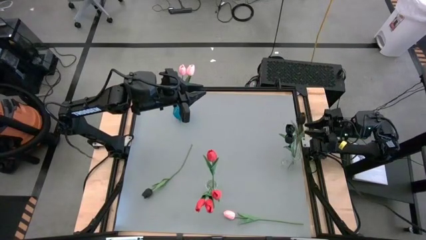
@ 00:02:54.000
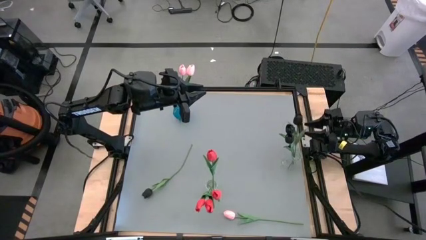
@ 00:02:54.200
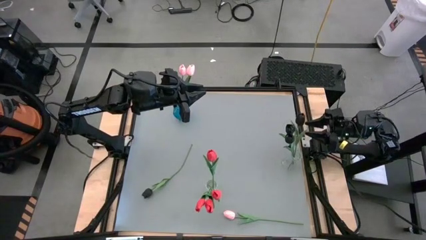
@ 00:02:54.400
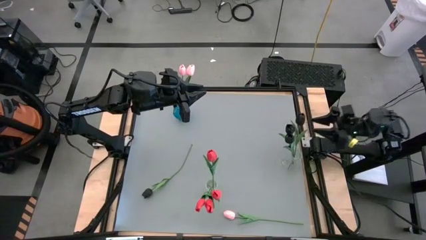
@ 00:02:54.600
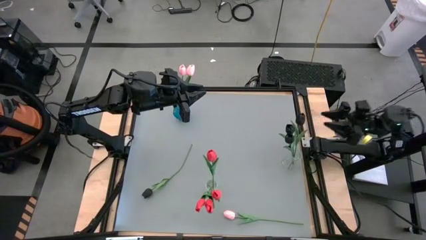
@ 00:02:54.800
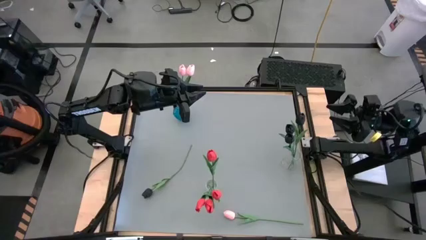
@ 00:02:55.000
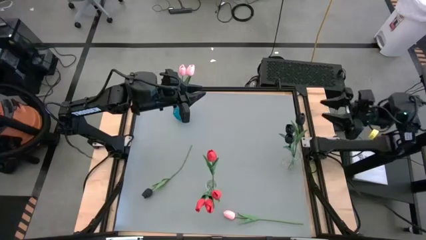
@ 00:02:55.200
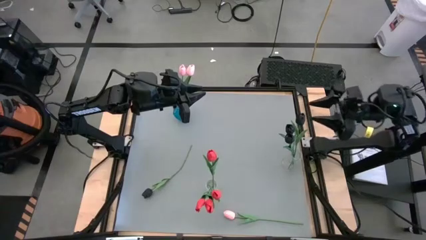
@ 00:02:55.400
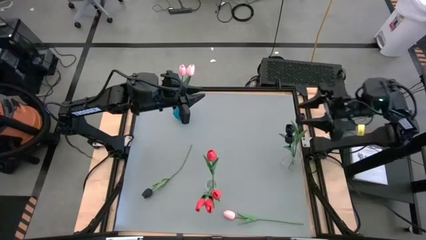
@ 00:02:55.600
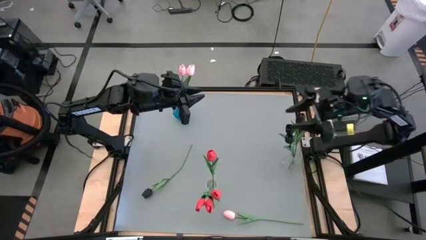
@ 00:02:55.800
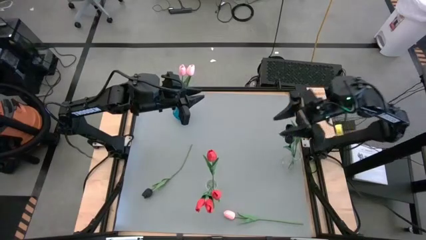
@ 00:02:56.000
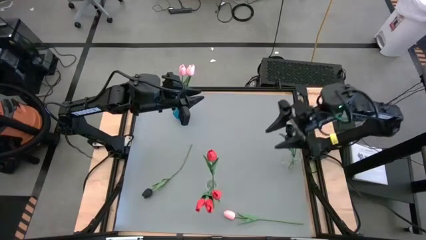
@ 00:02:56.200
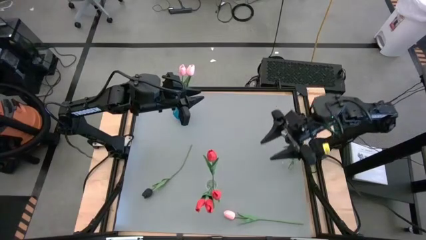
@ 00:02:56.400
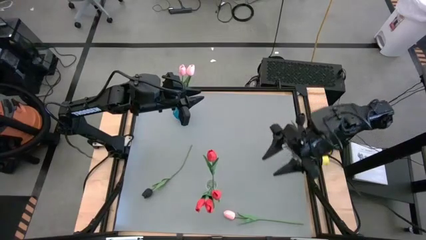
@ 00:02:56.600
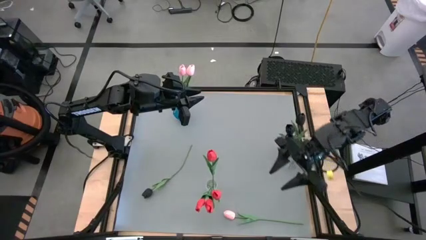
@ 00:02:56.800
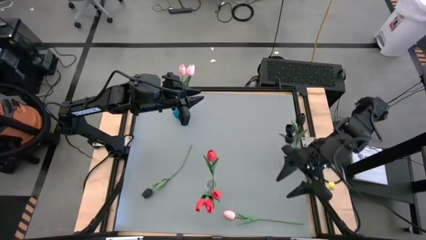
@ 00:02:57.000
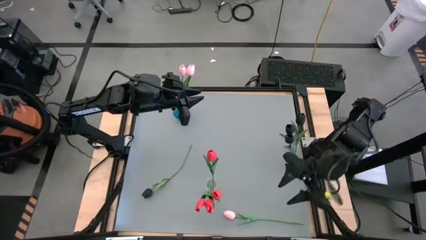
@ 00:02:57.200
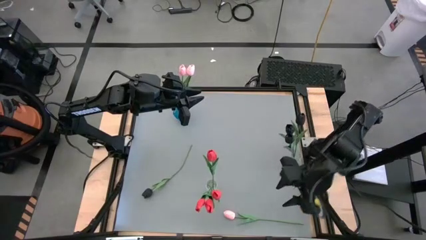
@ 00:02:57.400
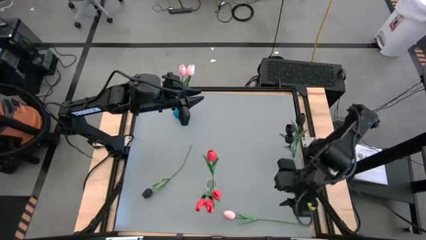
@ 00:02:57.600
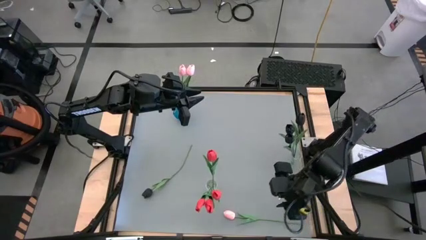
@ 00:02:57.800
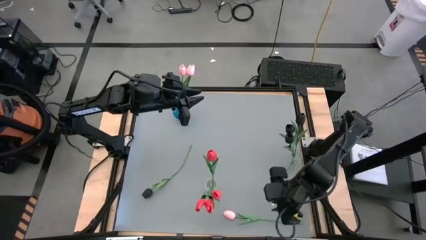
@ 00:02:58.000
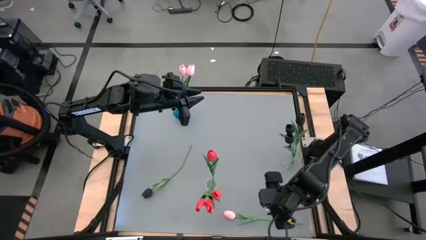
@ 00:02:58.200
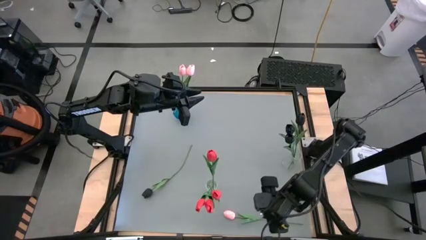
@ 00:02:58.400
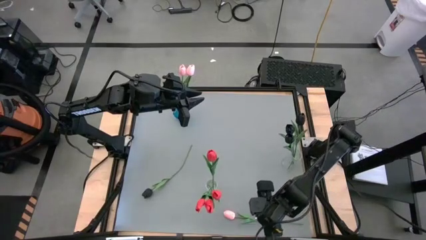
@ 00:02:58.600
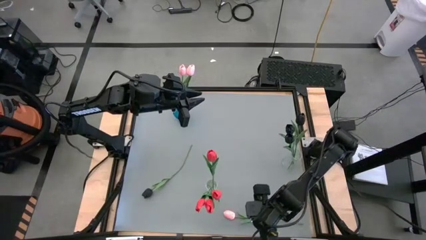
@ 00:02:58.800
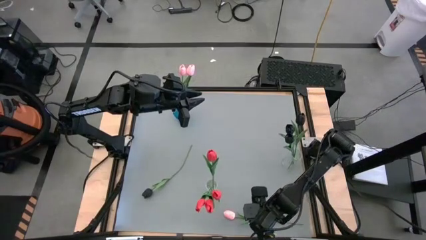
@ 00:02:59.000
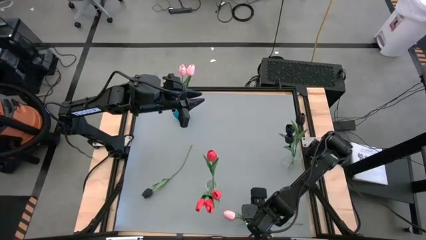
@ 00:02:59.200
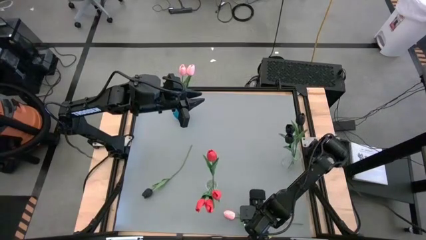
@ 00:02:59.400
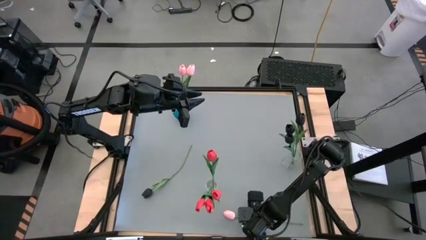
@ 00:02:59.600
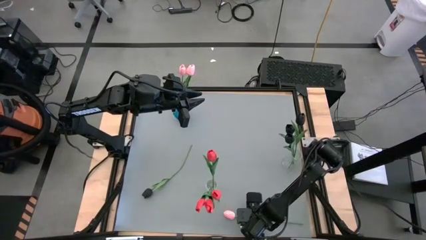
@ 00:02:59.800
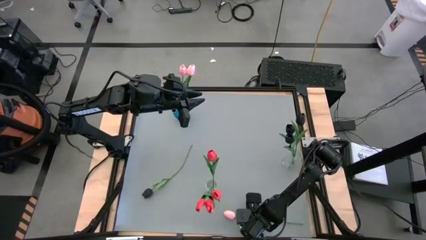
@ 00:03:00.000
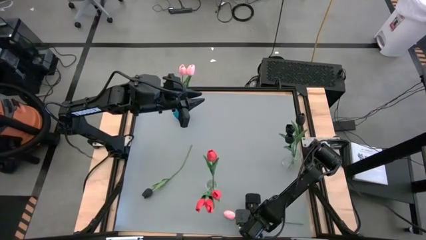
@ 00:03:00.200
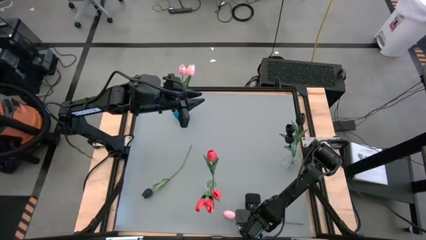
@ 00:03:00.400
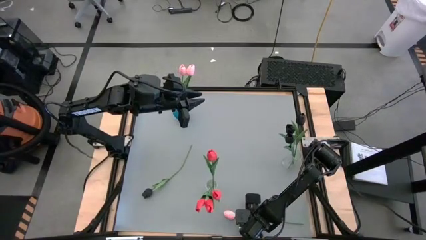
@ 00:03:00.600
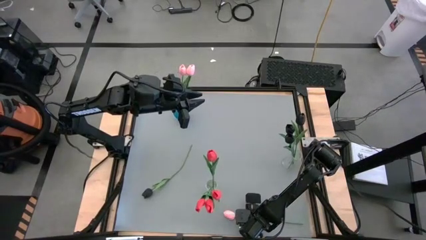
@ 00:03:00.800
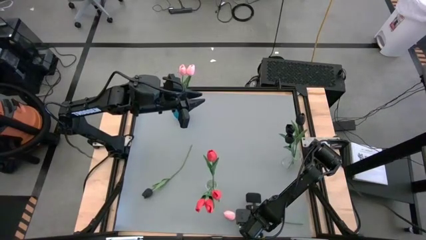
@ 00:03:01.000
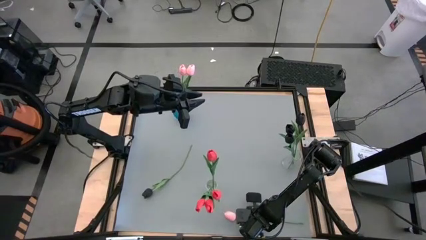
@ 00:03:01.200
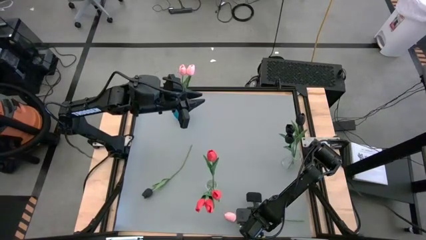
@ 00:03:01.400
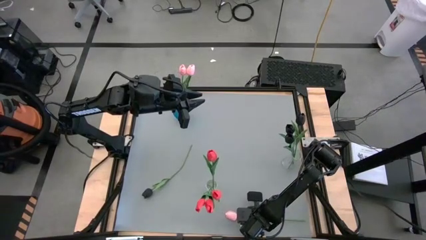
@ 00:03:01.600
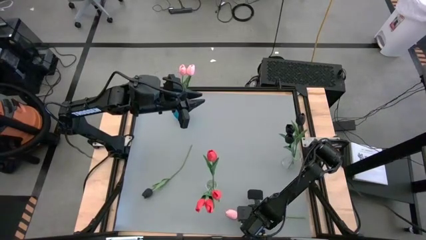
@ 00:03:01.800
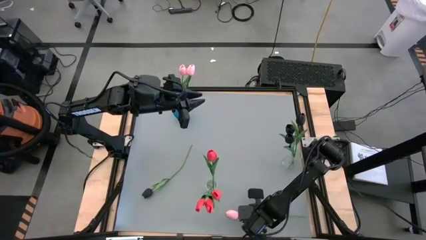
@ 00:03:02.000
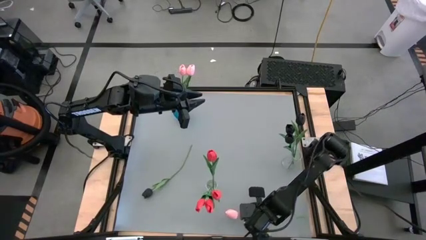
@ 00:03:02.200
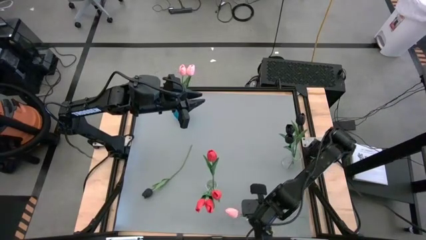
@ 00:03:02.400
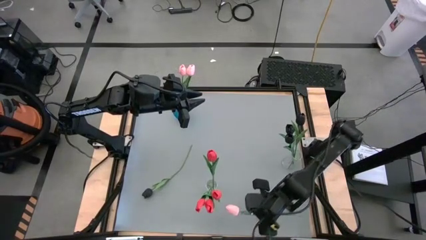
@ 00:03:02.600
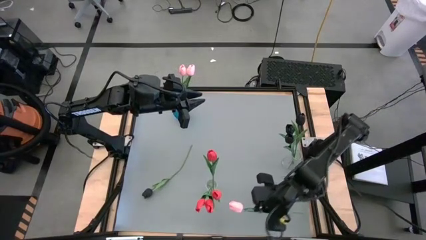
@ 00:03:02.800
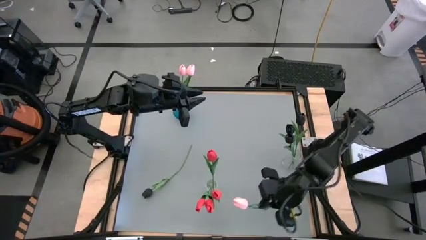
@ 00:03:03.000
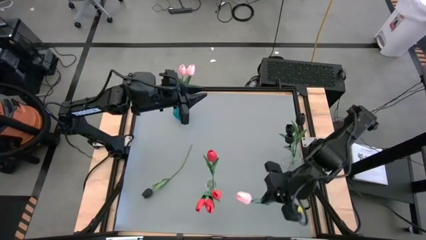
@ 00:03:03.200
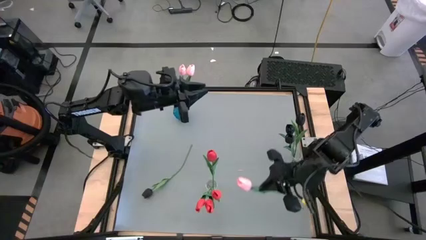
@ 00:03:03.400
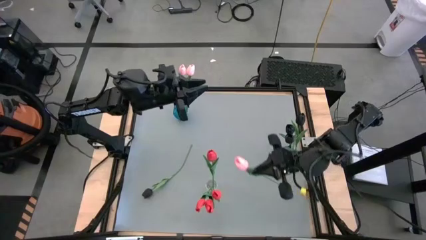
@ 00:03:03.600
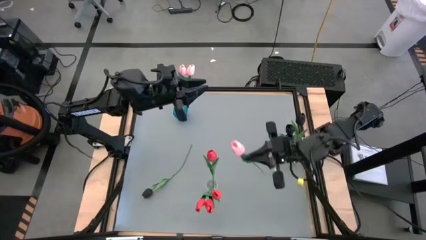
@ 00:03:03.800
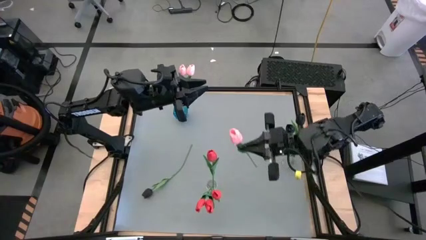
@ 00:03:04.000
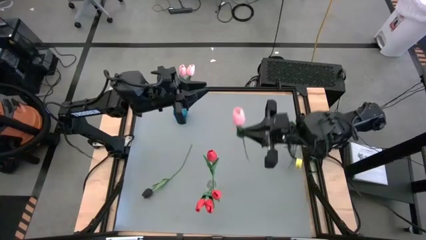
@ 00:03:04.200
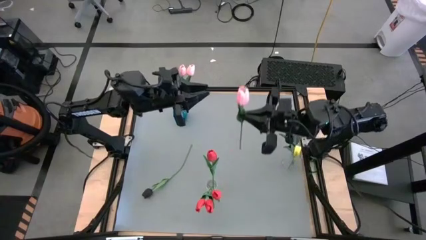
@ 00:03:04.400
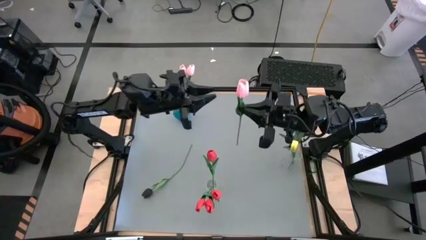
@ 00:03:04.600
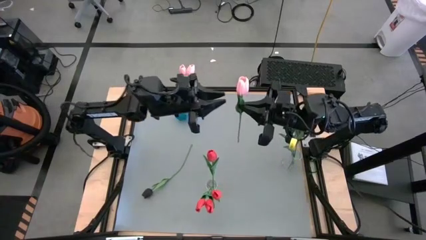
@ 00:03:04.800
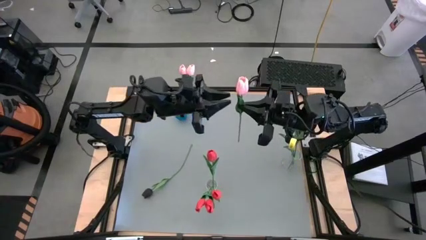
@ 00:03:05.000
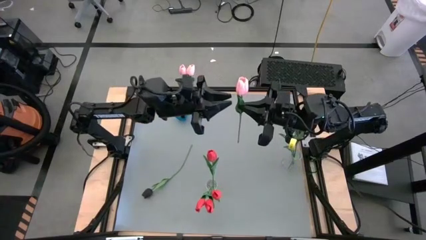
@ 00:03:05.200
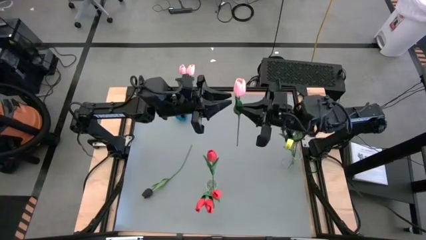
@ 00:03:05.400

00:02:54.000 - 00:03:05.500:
Task: Sort flowers into vase by color
Put the pink flower into the blue vase
